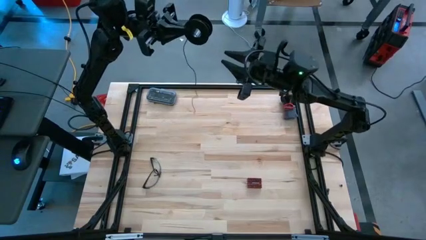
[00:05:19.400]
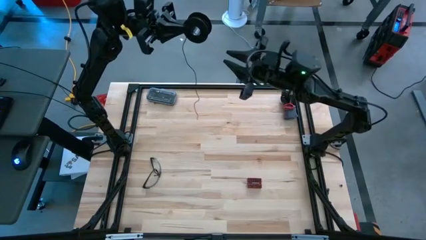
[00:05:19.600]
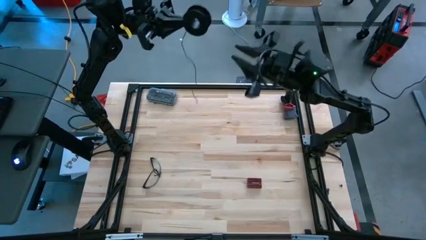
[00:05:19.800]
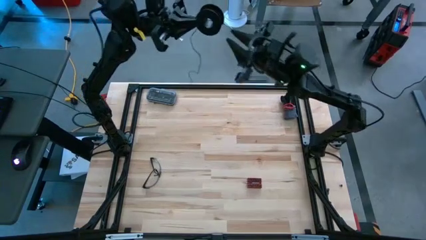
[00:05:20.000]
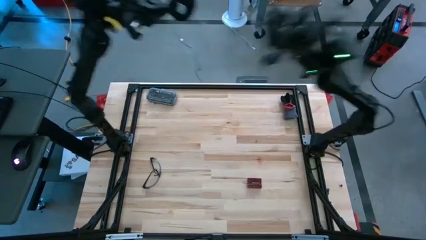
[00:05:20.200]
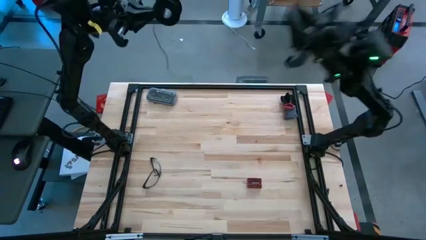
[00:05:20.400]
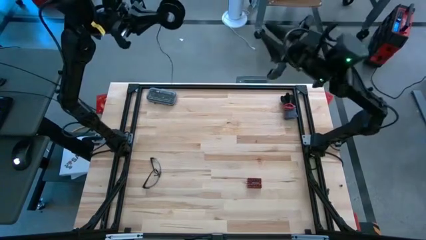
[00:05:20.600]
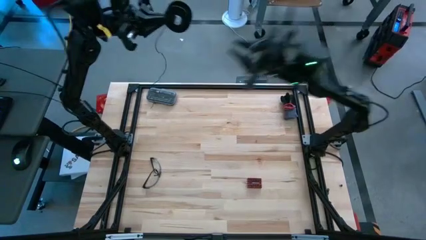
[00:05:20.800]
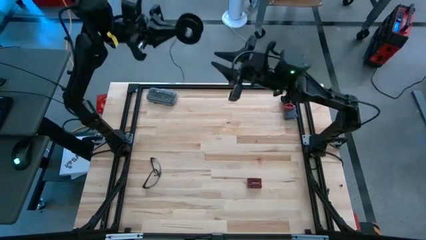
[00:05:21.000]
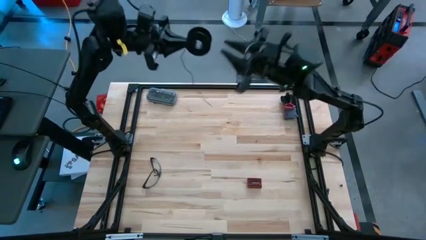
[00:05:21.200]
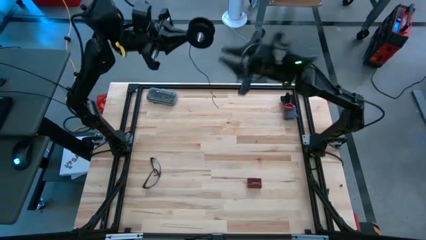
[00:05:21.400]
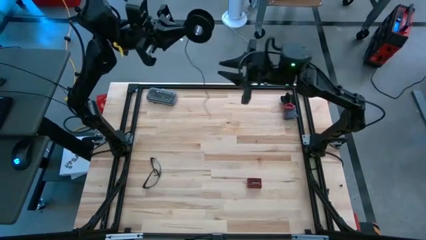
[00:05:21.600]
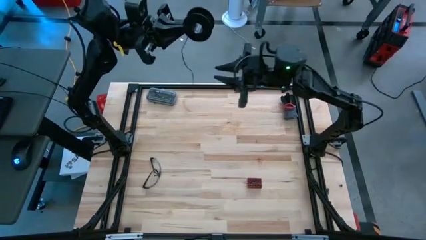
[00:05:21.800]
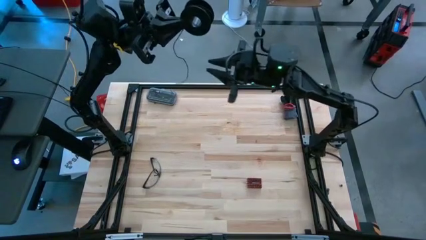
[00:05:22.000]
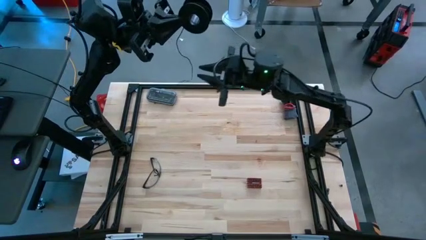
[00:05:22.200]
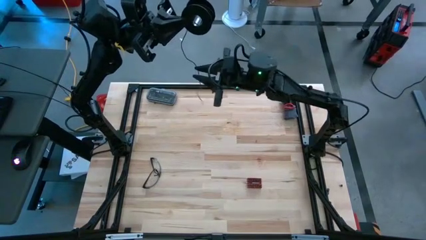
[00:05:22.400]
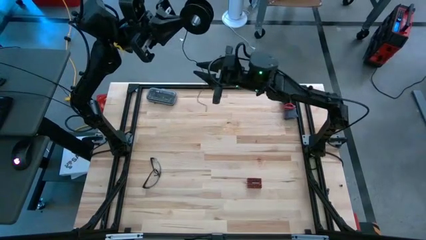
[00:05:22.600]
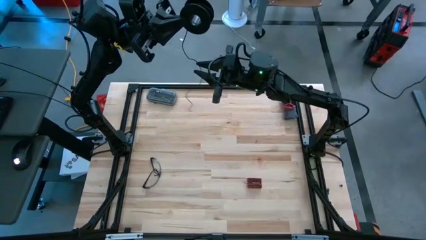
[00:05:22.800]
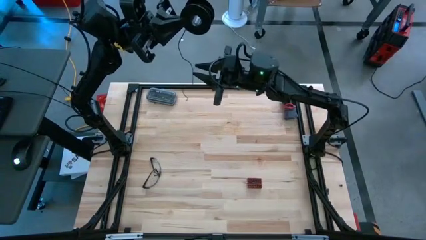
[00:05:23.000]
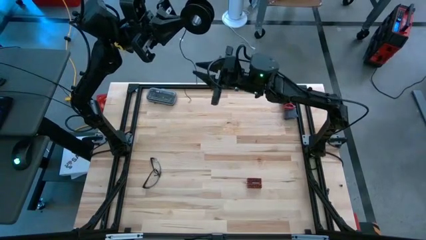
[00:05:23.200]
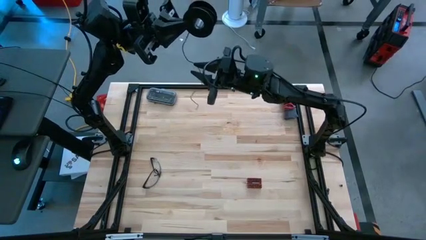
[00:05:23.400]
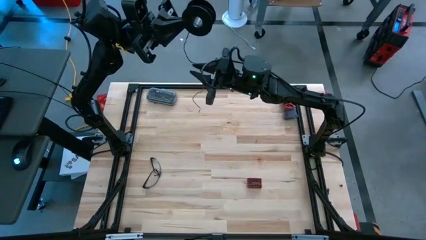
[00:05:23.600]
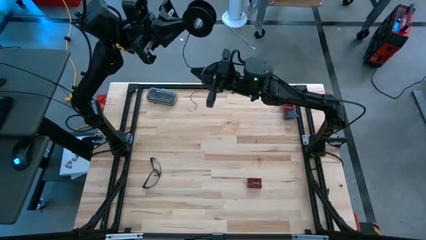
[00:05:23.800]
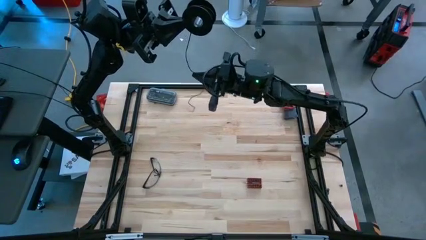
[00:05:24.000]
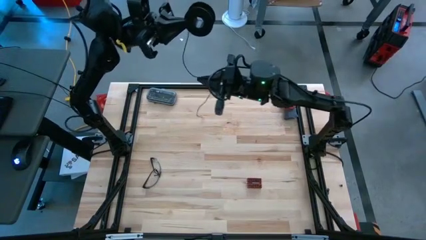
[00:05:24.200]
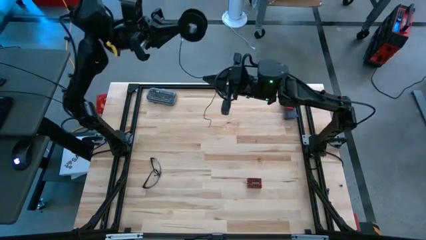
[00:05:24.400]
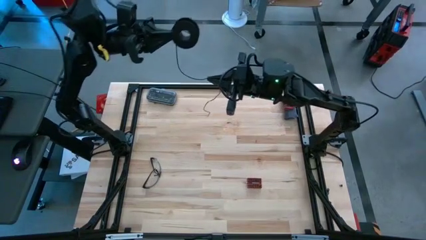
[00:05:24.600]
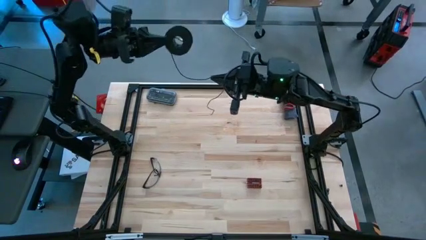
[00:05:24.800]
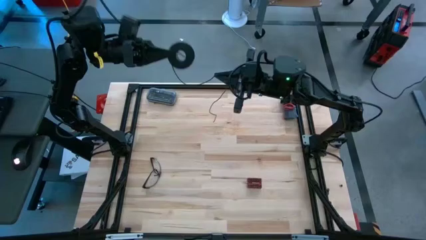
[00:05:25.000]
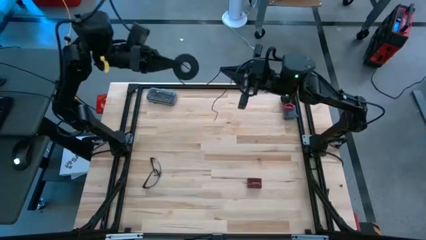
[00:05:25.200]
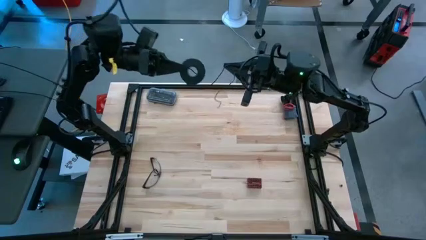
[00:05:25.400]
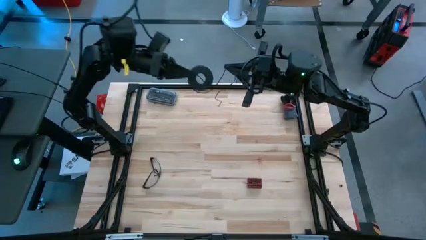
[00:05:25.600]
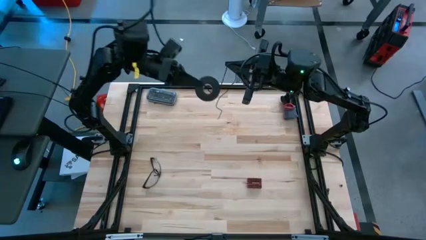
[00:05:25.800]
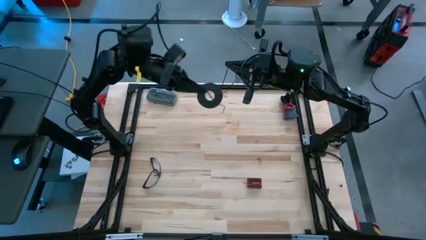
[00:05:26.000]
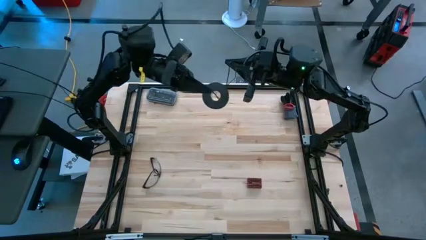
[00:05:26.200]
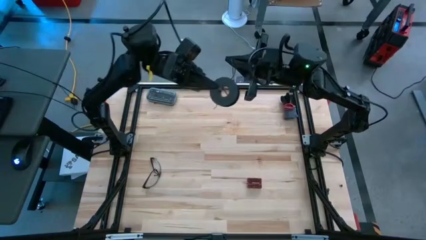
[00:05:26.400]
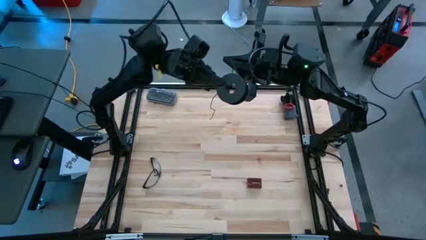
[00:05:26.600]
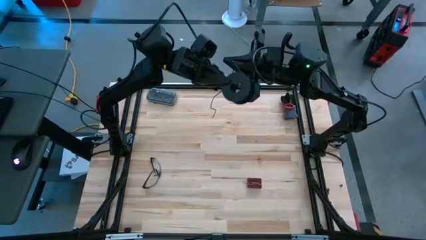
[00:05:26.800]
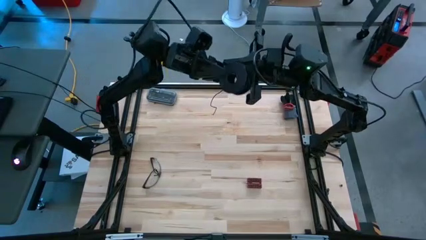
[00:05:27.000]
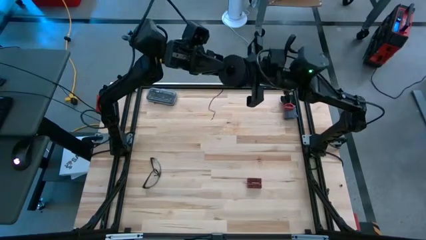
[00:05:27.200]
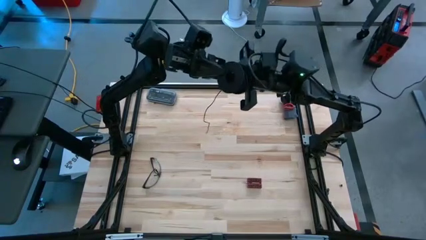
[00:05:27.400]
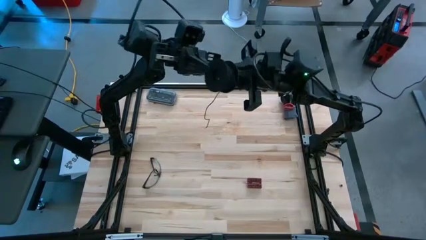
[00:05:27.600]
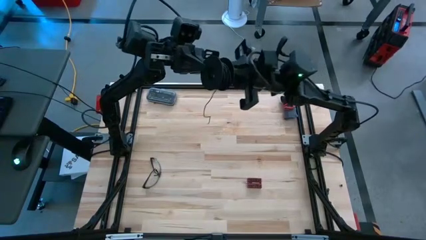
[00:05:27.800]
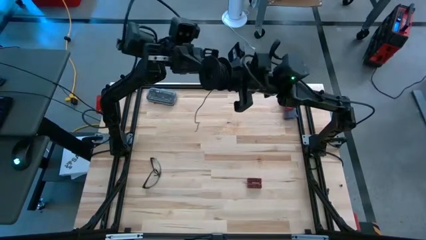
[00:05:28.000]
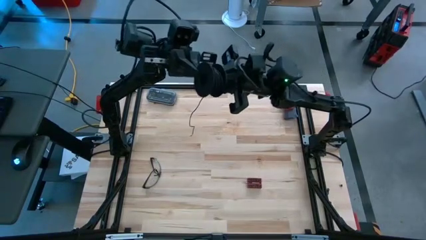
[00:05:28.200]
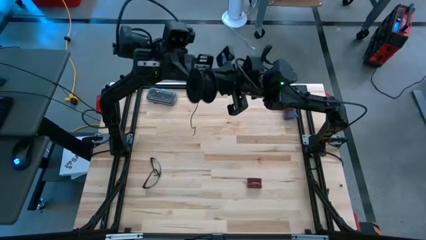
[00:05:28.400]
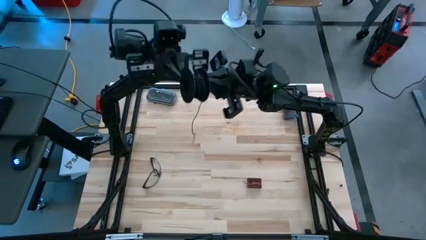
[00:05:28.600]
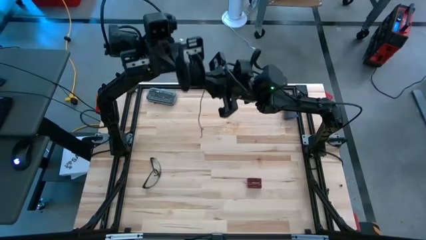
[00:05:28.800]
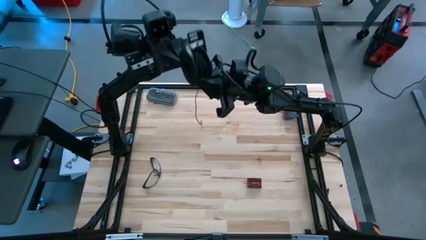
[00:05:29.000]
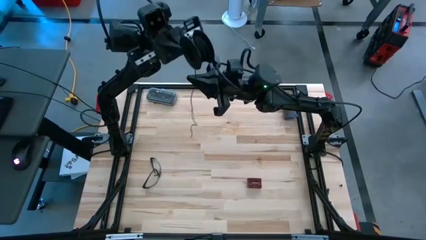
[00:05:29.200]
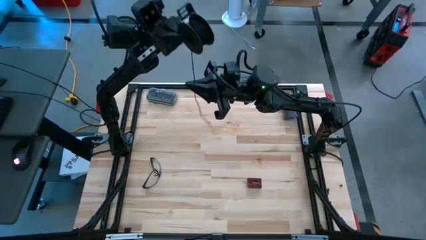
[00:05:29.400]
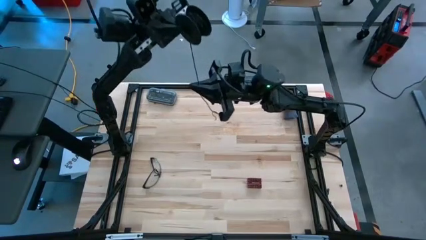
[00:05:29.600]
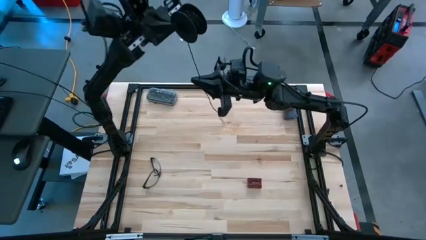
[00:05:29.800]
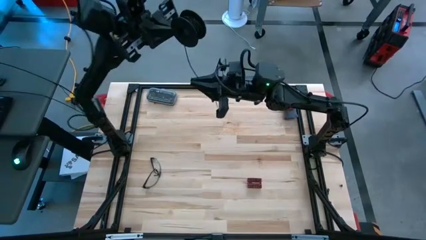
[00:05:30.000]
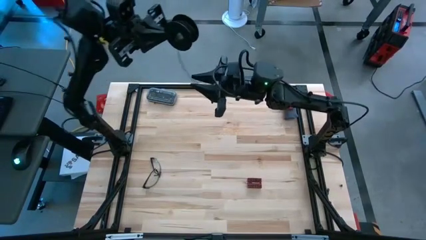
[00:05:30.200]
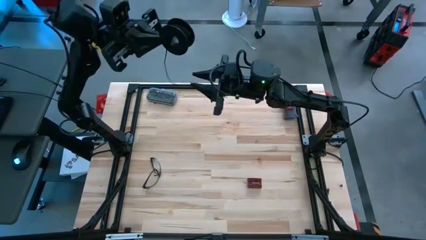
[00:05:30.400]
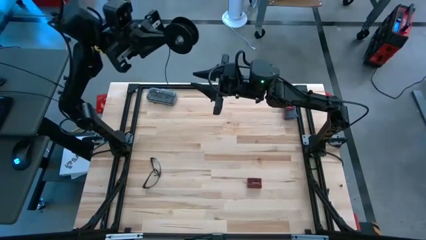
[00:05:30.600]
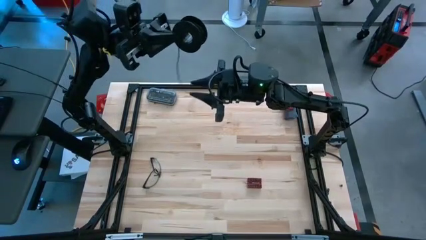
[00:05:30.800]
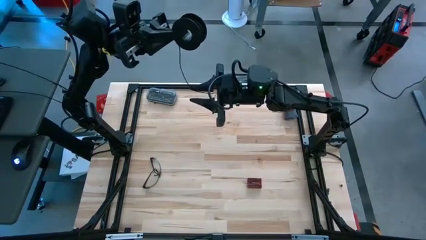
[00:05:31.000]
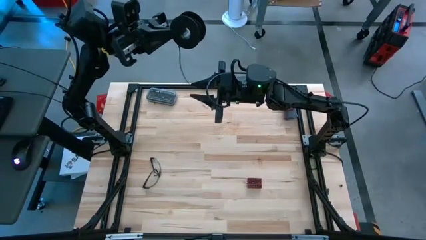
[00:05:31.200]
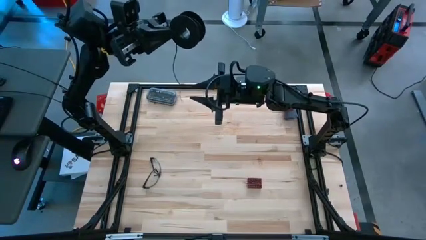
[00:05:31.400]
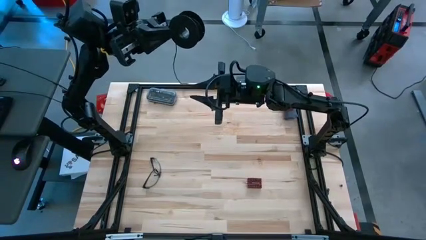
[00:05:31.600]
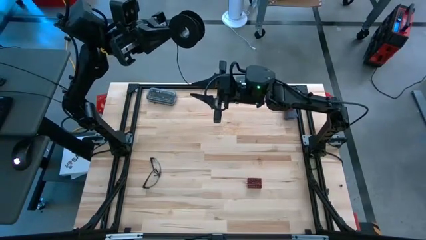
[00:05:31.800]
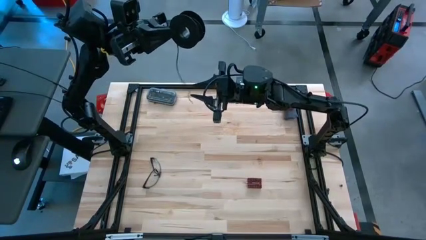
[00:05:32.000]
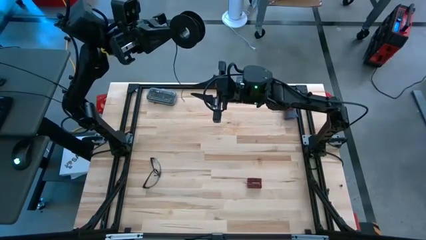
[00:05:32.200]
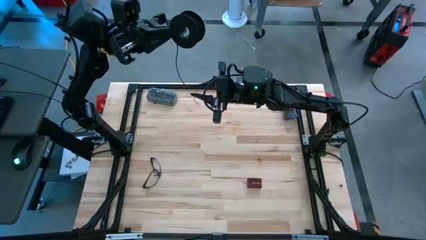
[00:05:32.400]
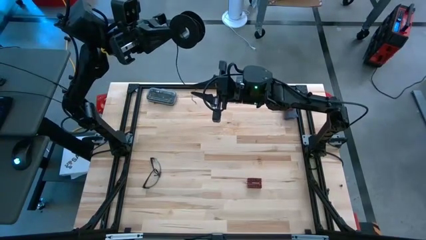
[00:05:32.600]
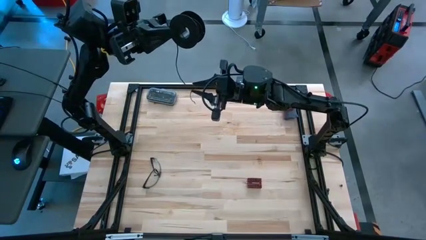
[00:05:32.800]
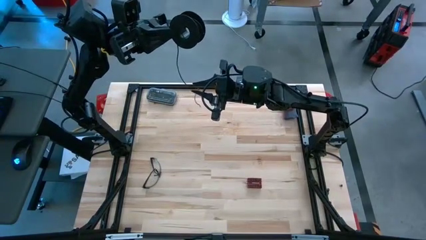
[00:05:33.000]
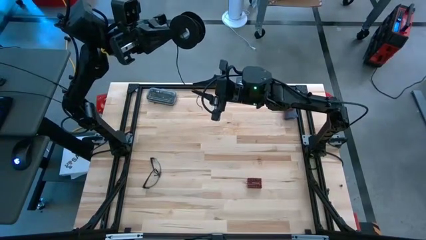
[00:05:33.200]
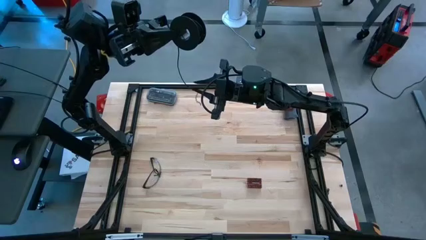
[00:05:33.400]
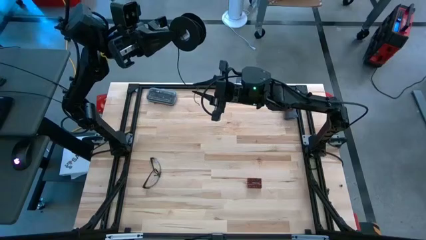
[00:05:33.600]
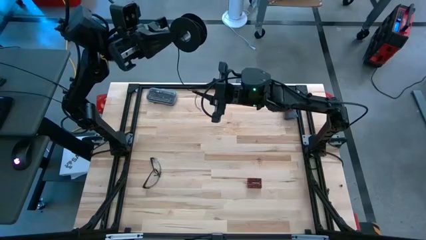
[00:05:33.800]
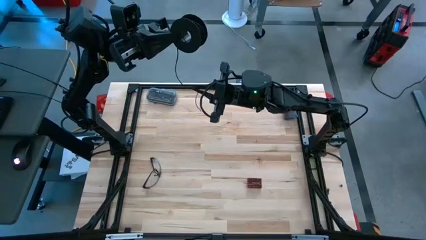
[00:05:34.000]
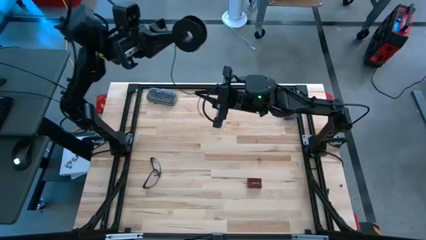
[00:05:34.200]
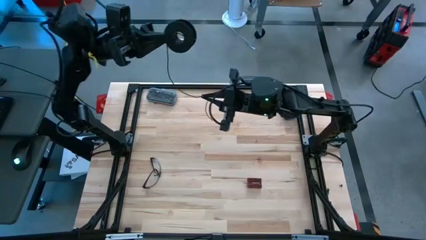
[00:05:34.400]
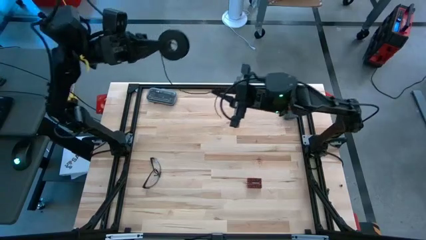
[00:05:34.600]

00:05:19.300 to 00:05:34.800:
Task: Coil cords
Coil the black wire into the spool
